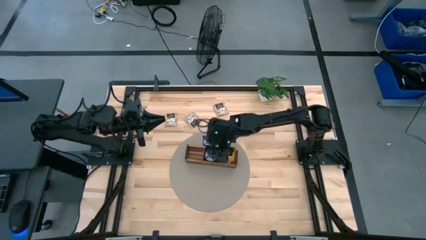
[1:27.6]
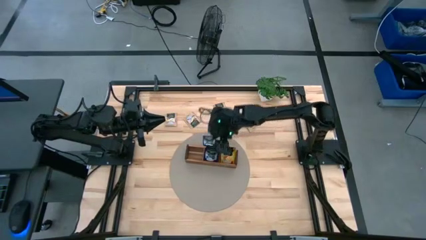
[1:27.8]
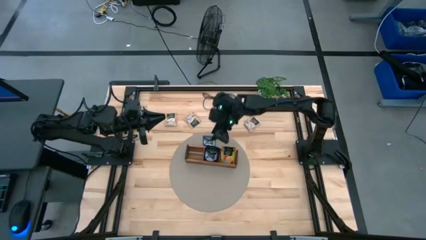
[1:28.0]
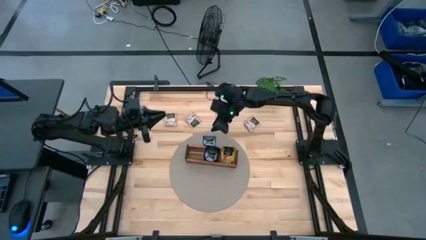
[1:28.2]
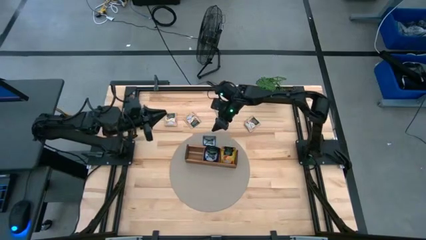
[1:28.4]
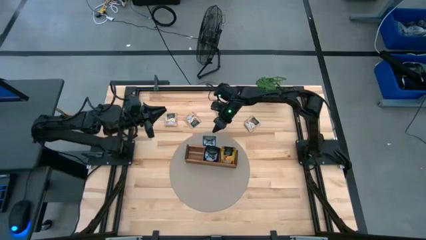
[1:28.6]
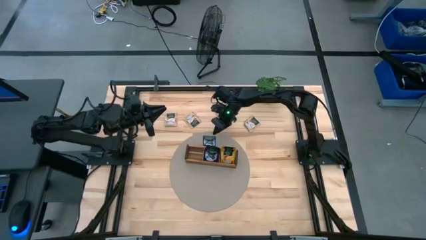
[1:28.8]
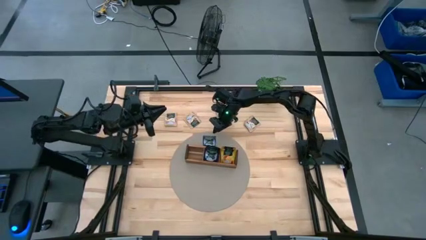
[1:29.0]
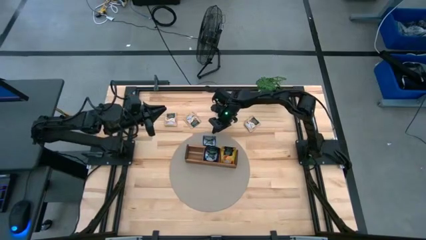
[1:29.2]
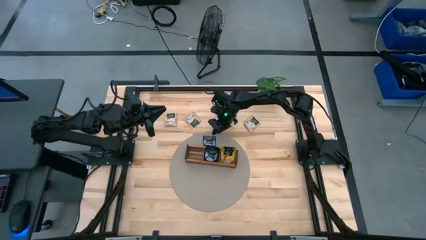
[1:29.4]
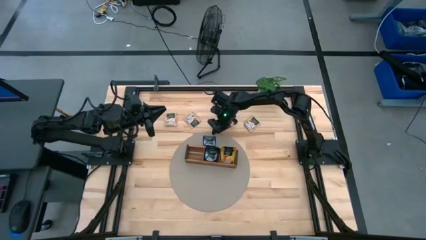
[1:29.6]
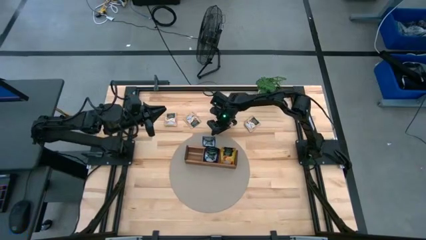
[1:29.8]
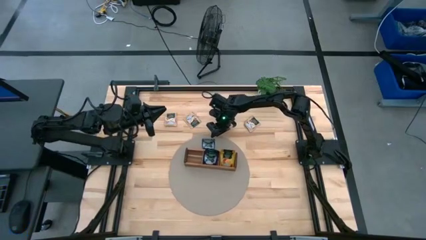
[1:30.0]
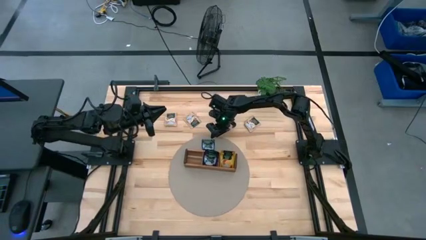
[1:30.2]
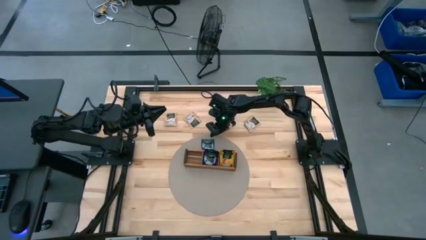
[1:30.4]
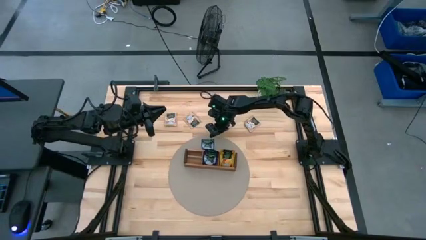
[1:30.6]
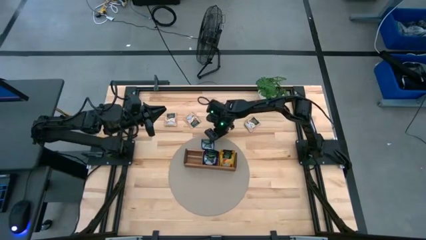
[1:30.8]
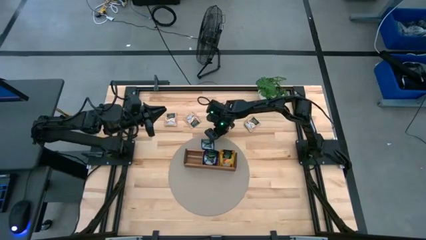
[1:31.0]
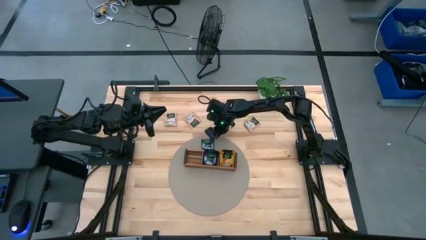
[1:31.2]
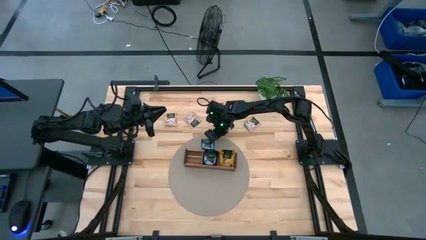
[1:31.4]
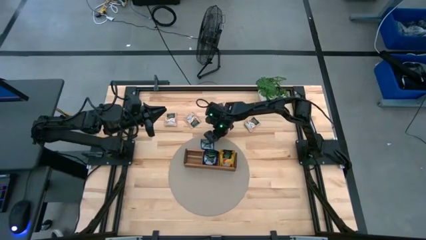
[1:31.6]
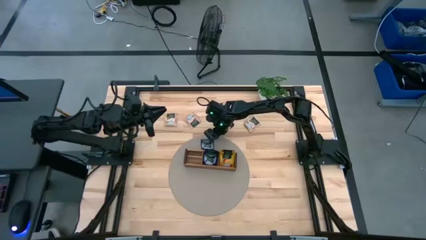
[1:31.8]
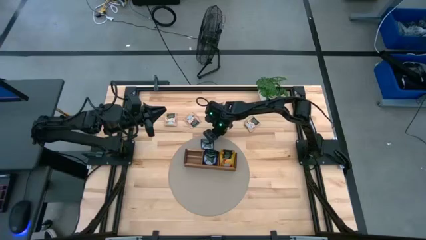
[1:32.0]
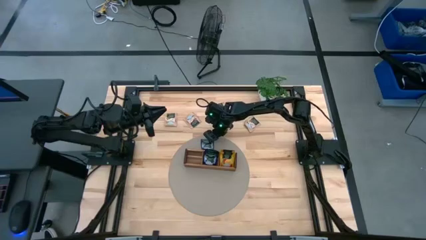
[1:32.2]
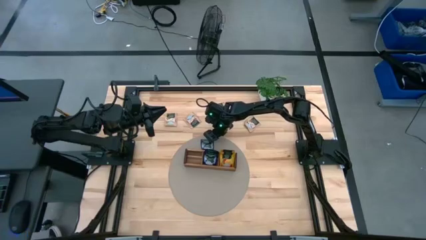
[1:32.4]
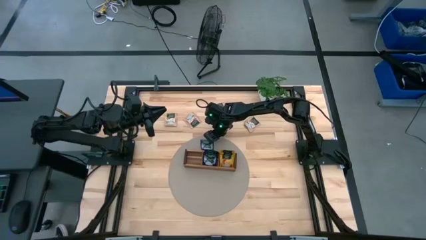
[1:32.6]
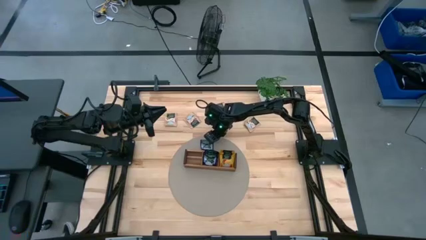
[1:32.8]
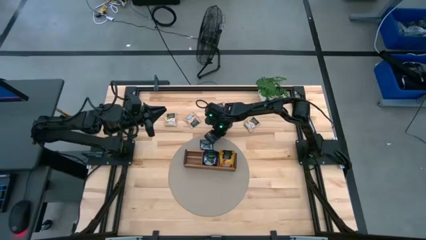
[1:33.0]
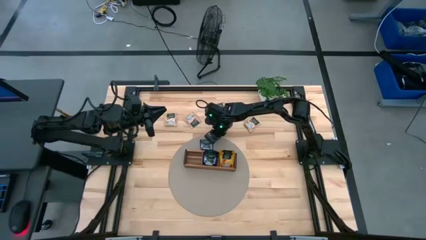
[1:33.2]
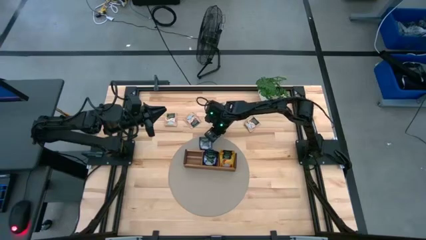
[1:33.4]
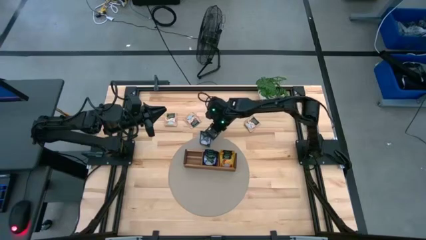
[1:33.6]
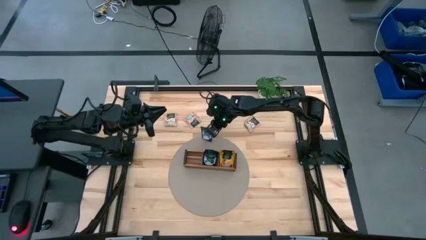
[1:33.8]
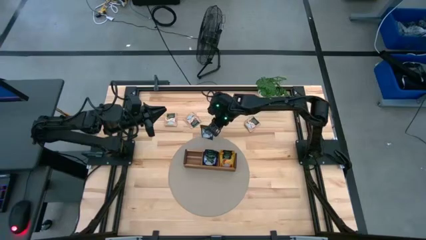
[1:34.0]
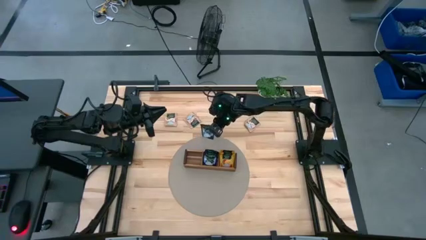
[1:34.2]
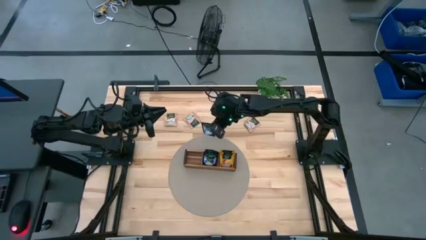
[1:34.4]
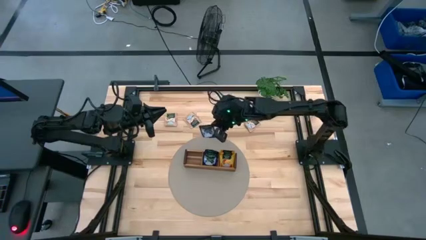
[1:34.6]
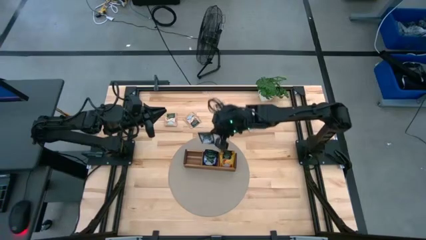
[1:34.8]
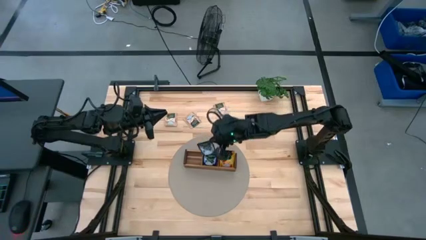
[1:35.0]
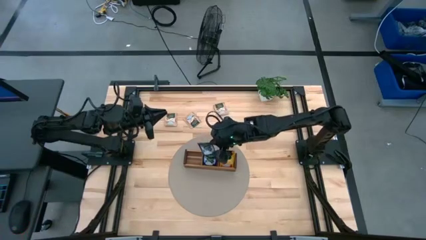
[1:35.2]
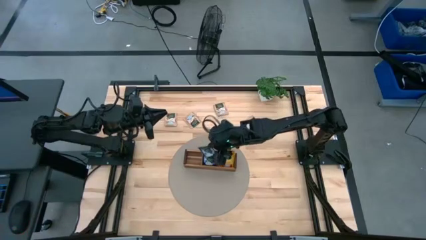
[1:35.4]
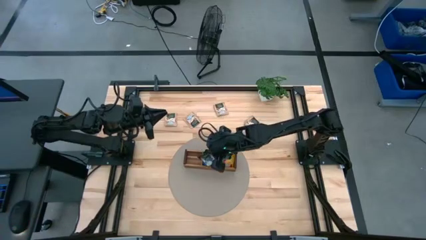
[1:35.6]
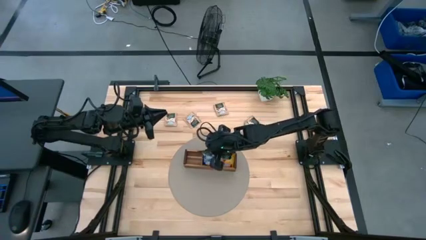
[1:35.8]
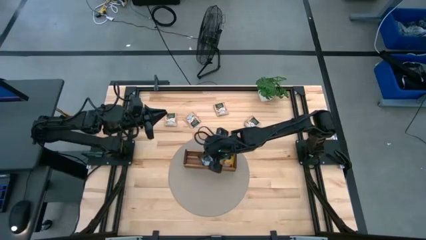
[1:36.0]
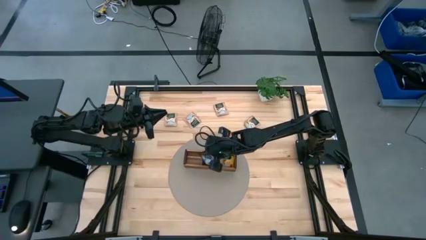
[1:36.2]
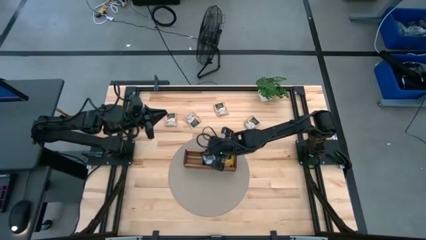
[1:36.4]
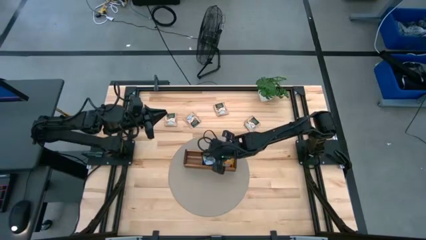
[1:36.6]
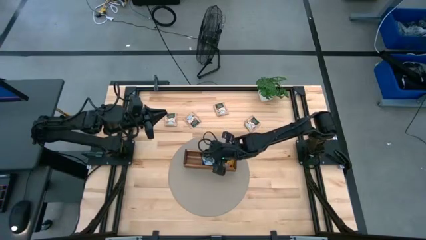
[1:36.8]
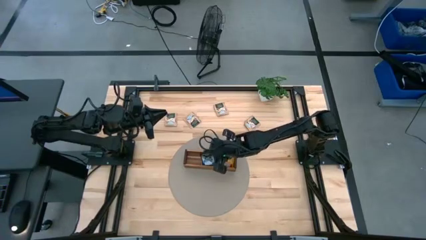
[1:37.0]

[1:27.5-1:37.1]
Task: Pick & Place Tea
Put the purple tea bag into the middle section of the wooden organizer

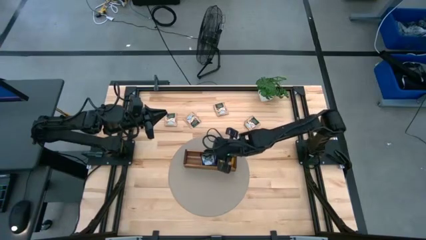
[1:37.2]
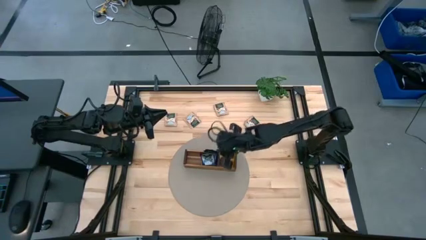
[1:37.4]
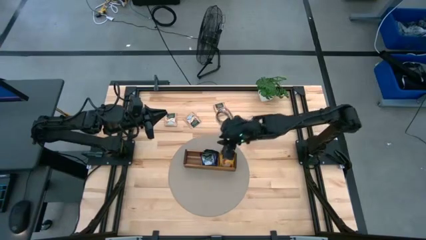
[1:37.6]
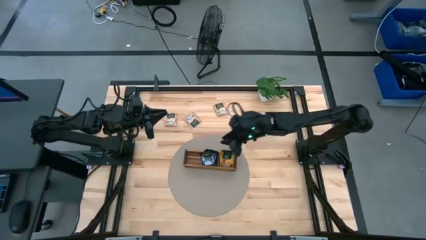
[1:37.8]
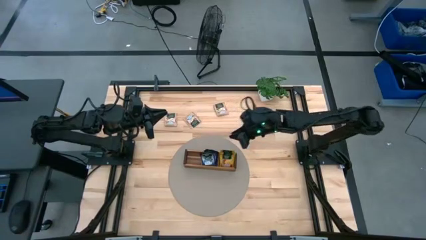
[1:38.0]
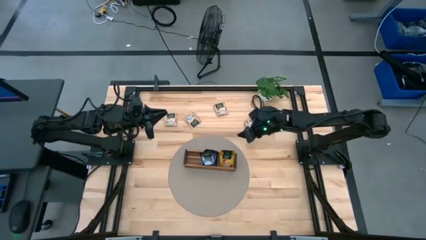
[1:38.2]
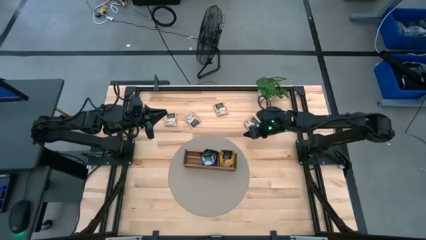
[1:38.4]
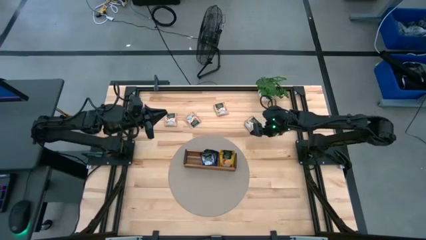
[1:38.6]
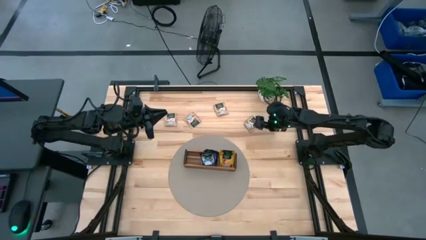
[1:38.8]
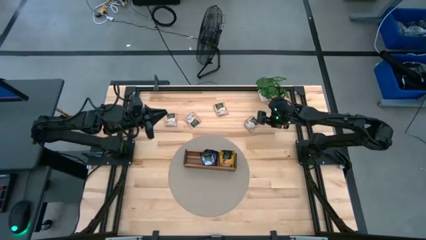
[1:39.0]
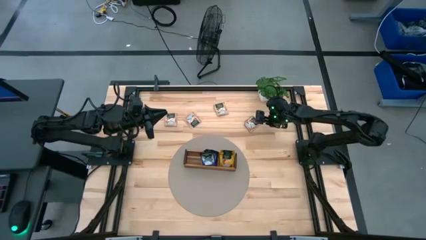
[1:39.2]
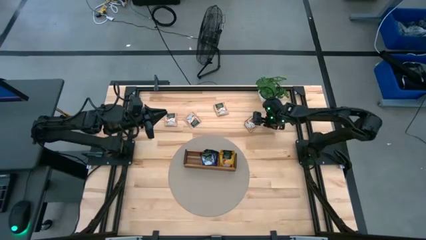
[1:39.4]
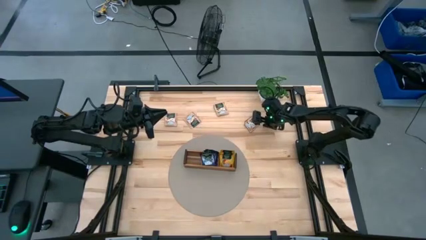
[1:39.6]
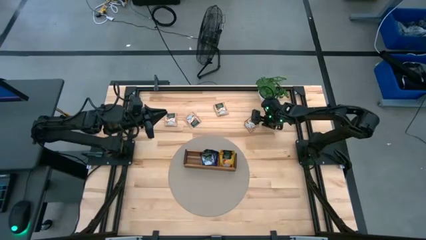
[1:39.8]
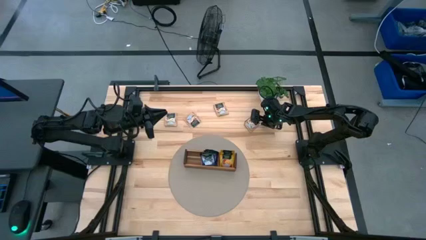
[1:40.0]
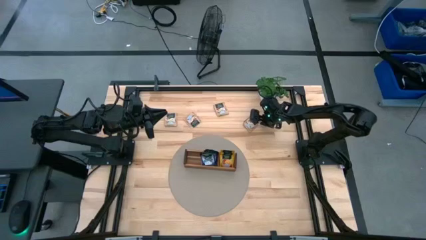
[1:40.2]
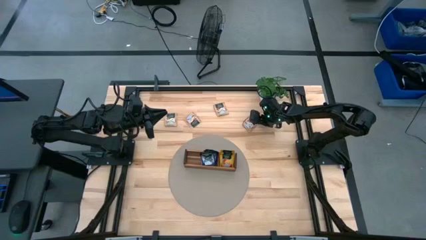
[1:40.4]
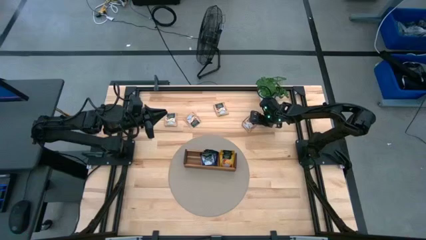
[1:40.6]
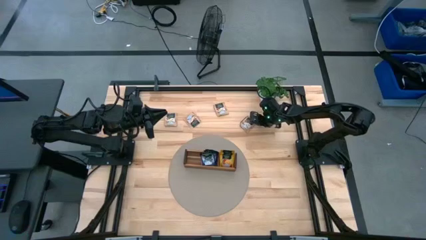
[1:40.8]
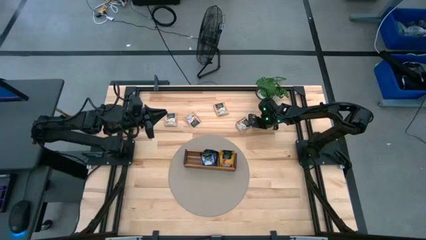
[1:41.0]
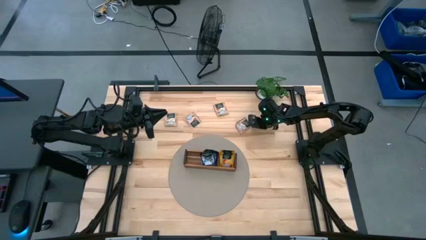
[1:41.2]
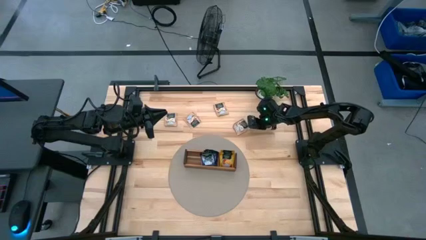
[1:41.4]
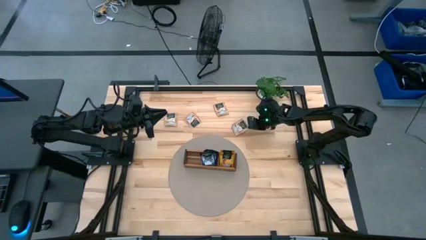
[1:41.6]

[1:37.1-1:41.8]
Put the brown tea bag into the left section of the wooden organizer

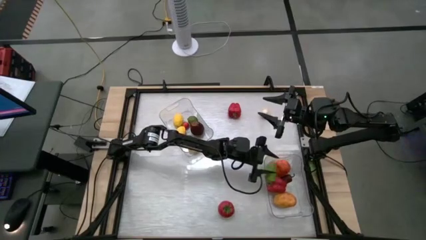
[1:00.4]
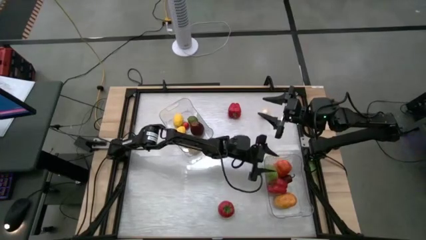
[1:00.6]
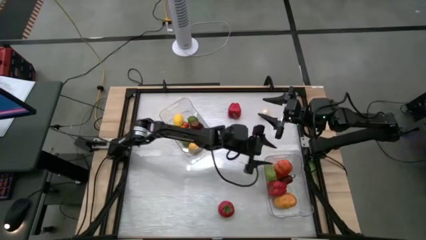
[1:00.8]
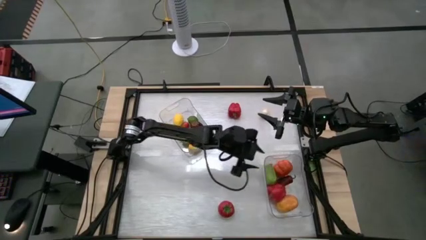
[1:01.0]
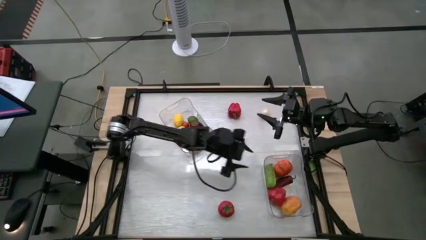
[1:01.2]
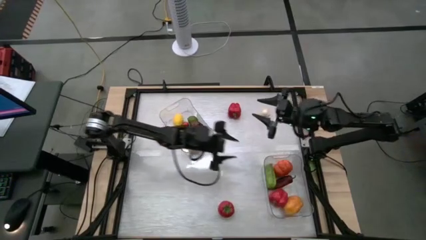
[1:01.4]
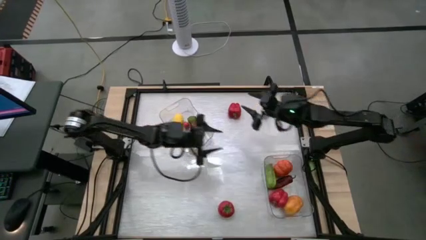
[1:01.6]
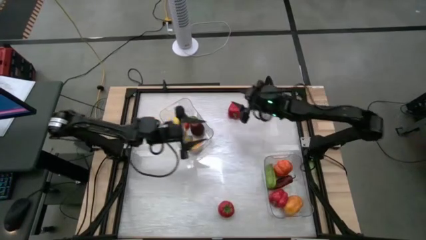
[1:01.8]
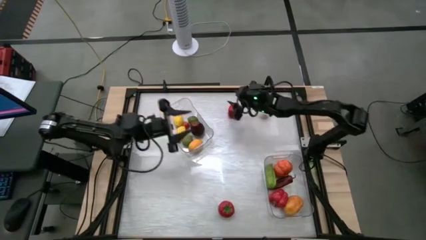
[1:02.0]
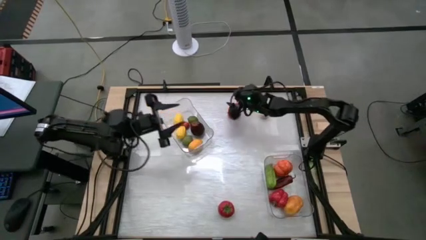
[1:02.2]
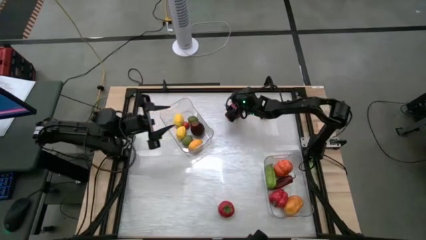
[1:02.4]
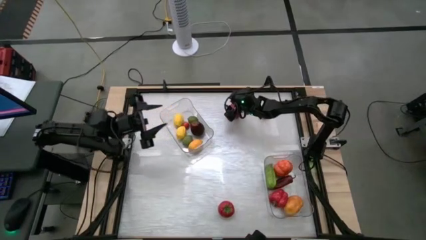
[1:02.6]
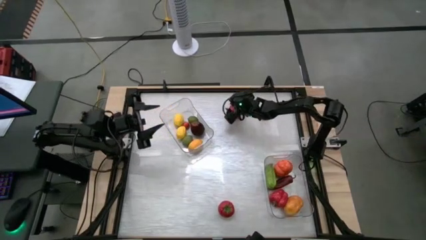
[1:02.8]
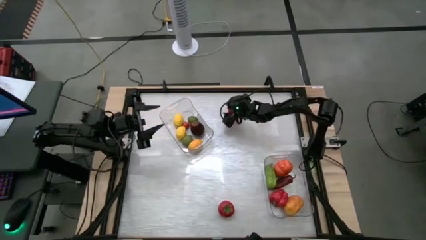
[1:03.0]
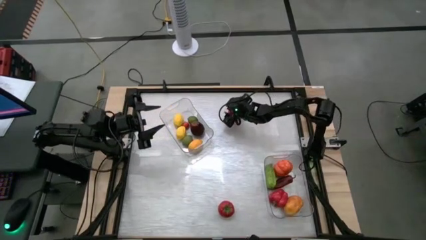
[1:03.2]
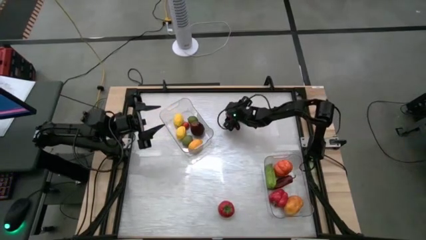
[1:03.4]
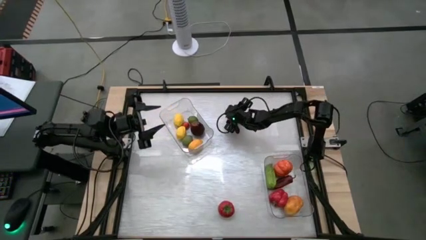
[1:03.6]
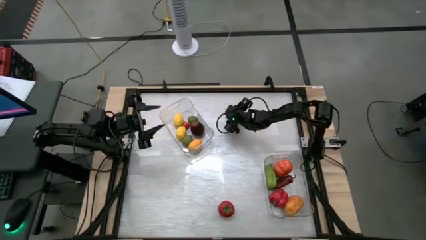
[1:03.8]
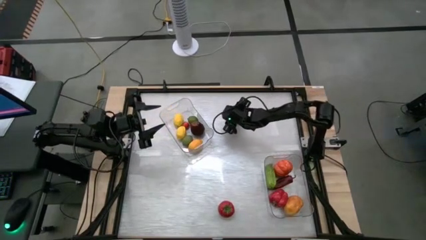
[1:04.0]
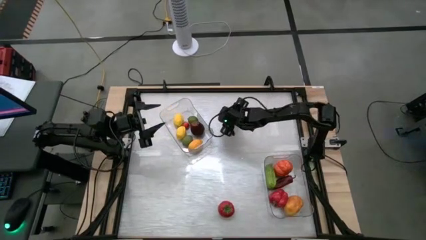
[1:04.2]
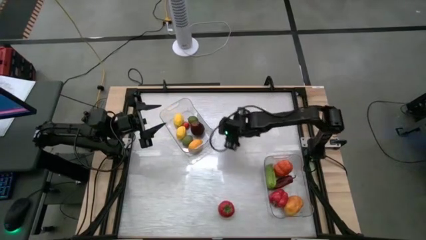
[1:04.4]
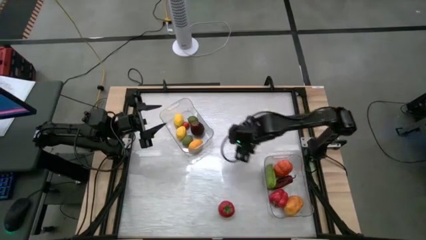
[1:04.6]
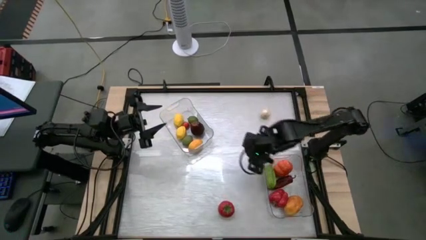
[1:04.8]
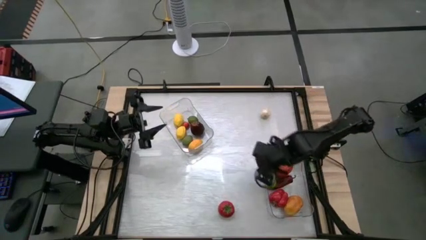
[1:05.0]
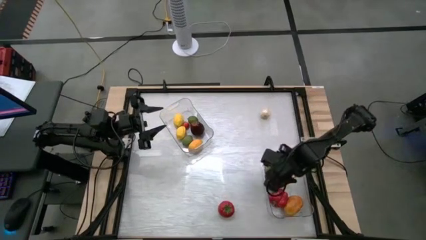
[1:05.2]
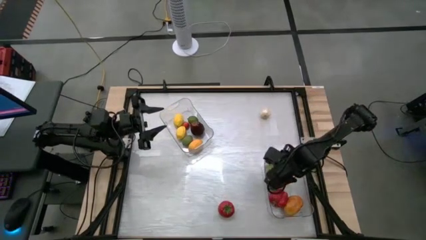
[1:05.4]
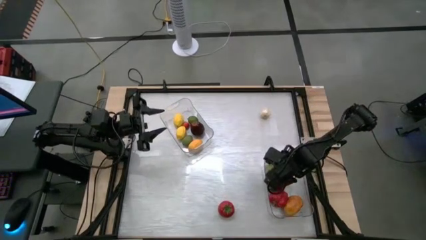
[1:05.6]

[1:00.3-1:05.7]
Task: Sort produce into baskets
Put the red bell pepper into the bottom transparent bin
